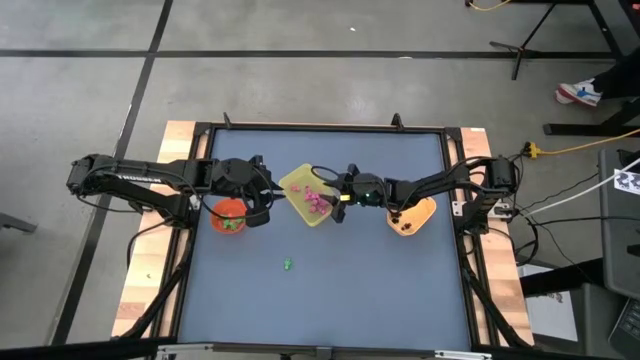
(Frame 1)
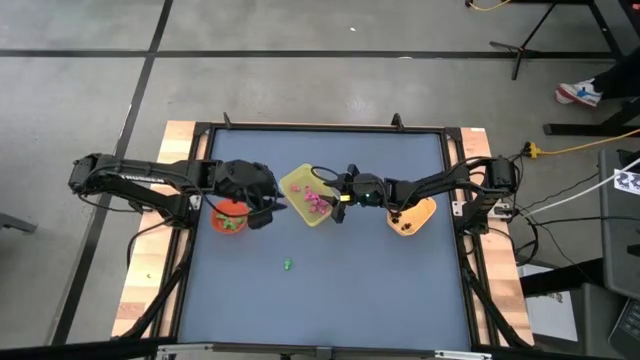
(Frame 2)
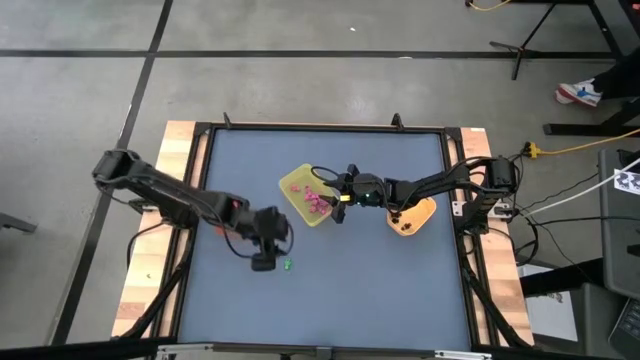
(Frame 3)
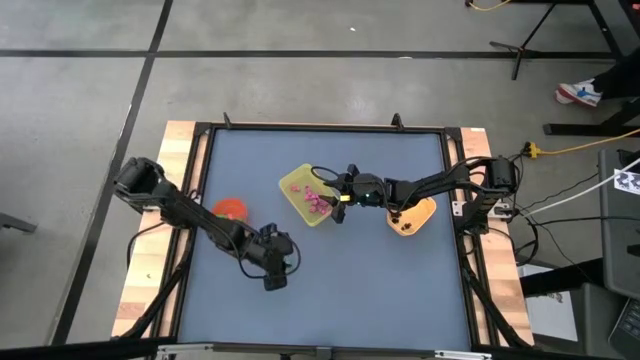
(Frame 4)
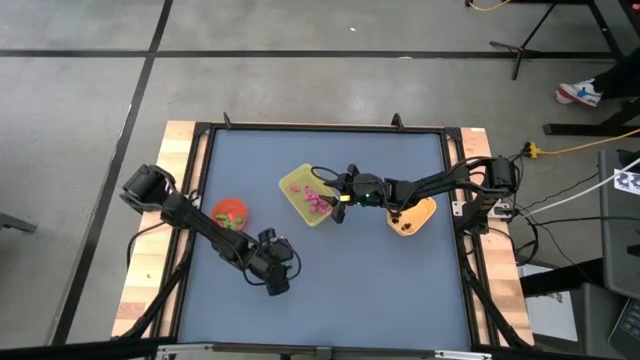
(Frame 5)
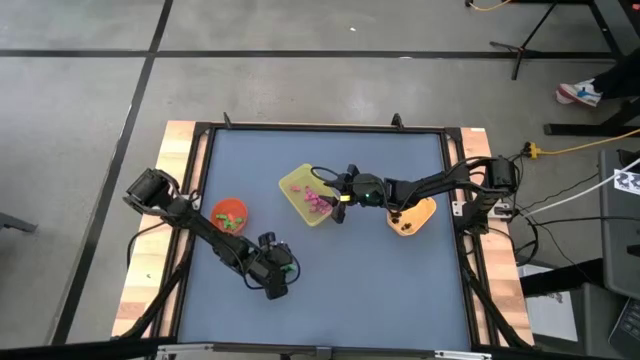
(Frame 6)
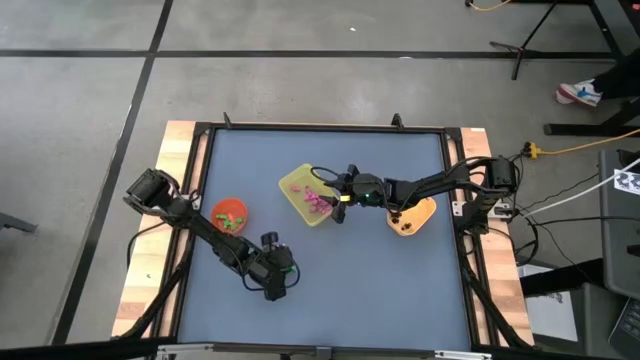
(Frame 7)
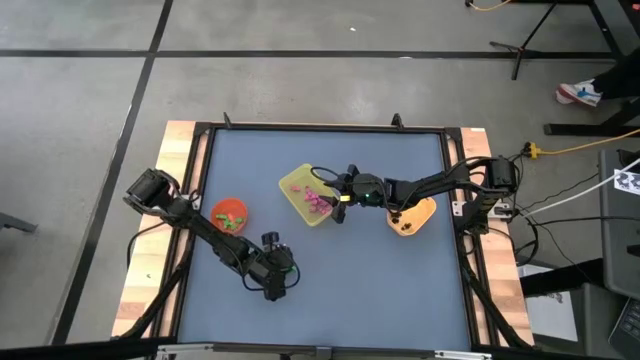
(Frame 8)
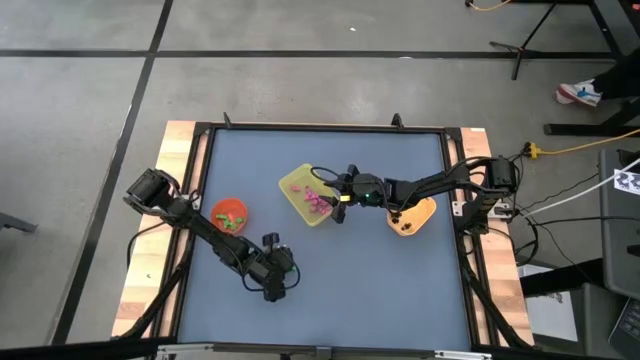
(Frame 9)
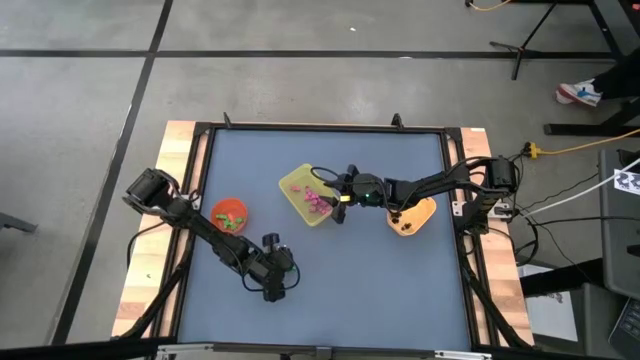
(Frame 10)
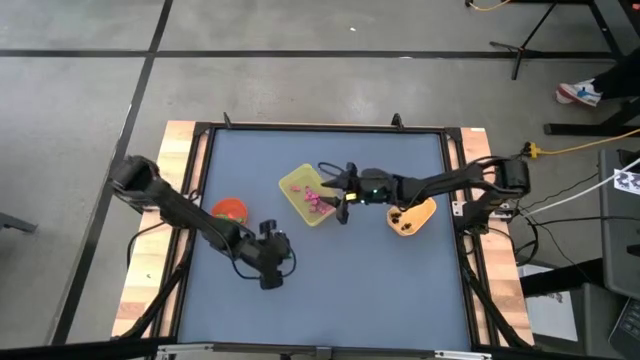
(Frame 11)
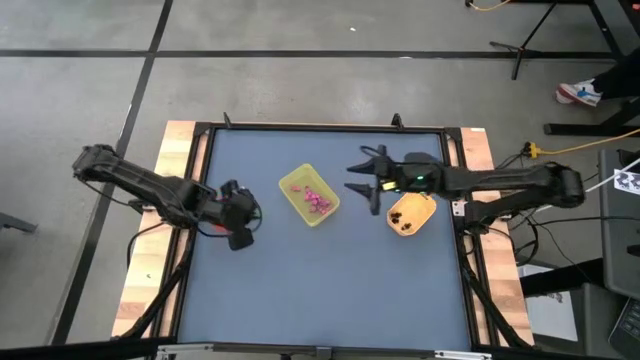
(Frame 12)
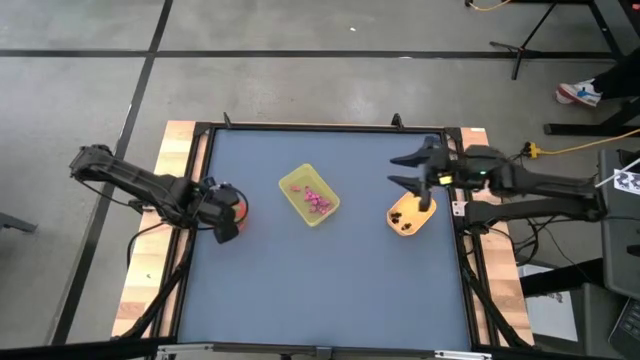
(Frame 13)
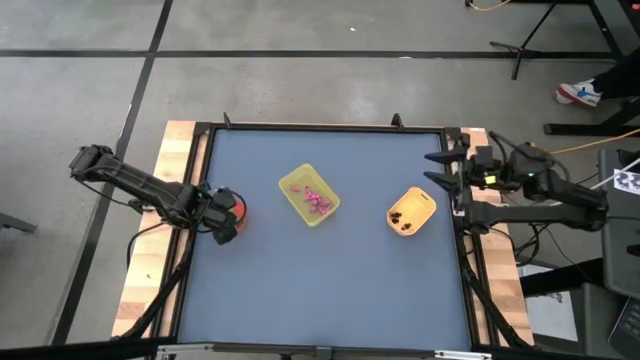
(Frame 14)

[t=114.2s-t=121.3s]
Task: Sort Halloween decoration
Put the green skeleton toy into the orange bin

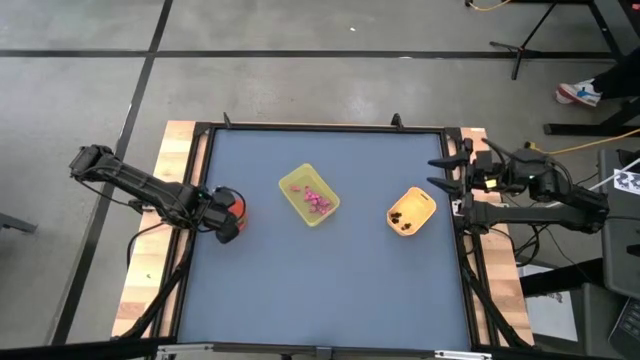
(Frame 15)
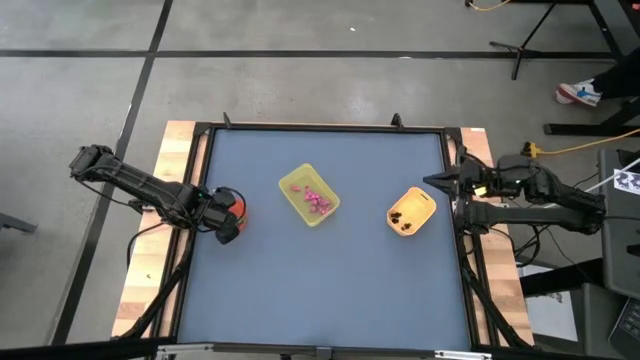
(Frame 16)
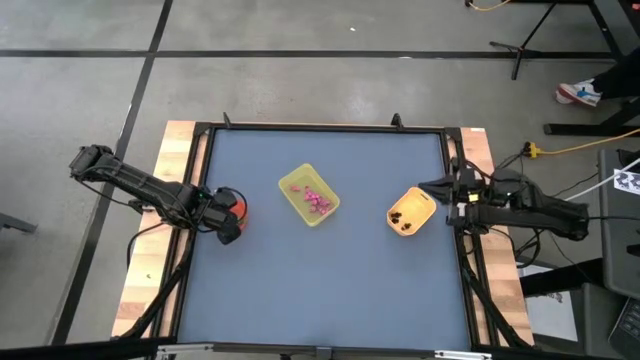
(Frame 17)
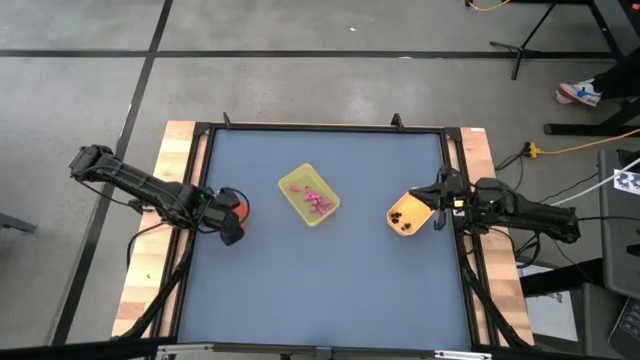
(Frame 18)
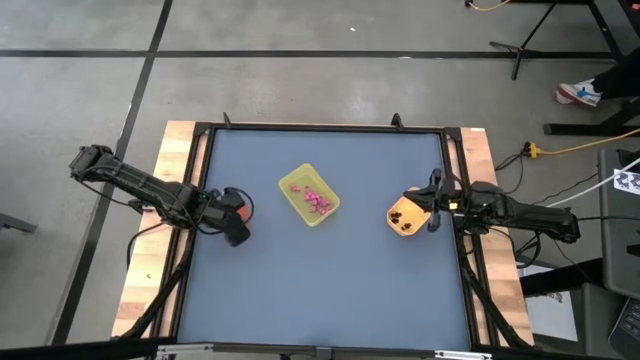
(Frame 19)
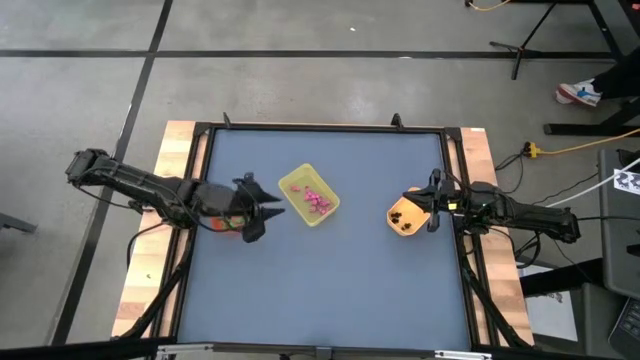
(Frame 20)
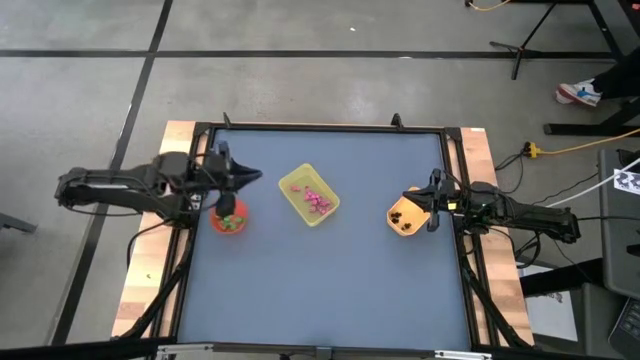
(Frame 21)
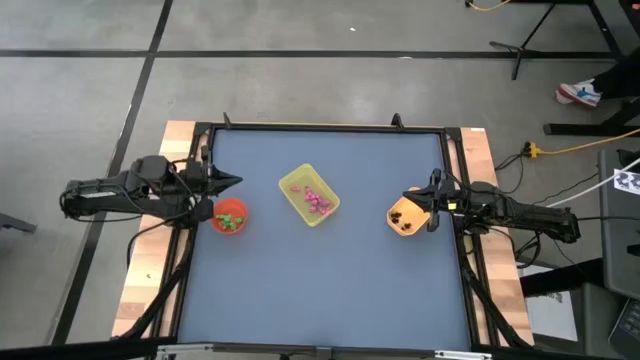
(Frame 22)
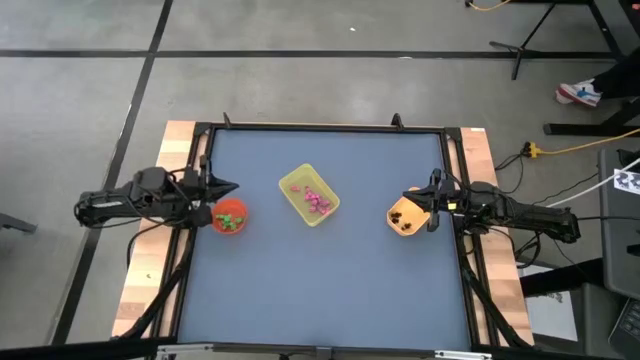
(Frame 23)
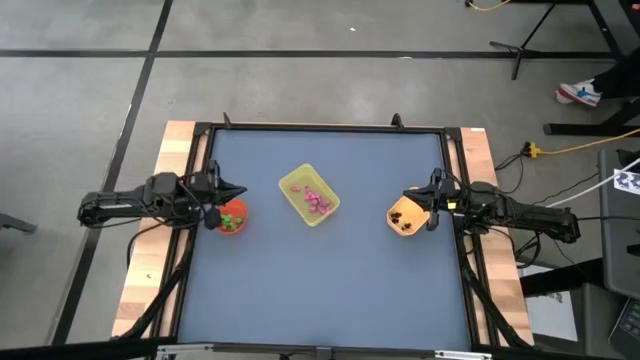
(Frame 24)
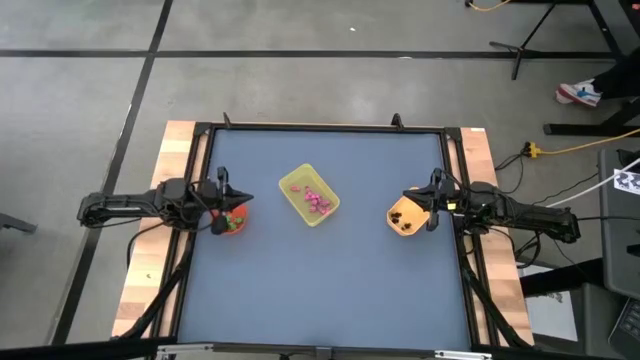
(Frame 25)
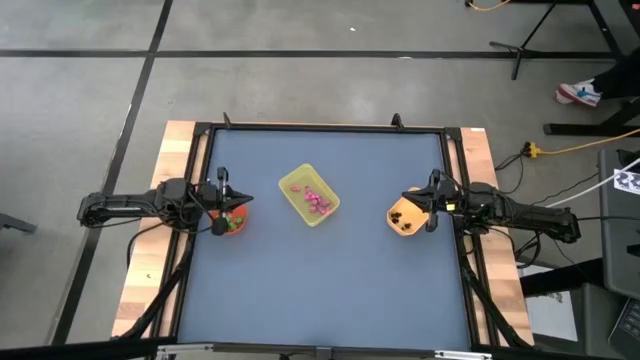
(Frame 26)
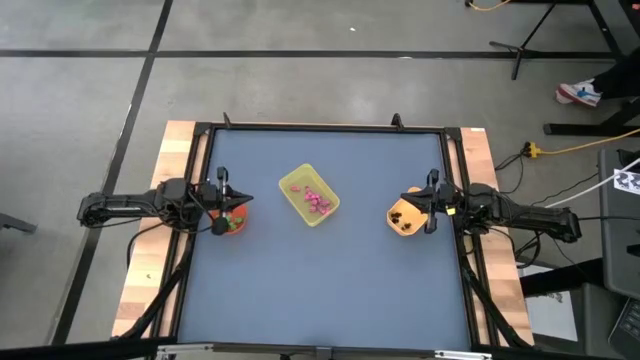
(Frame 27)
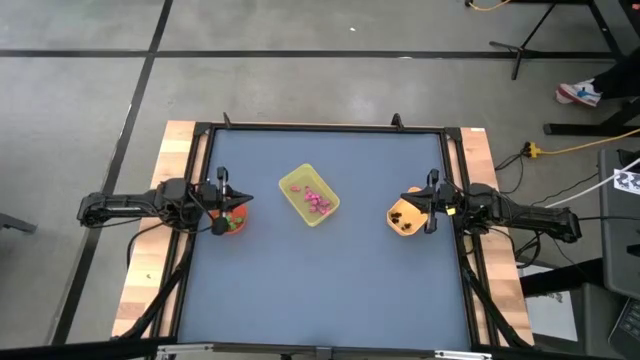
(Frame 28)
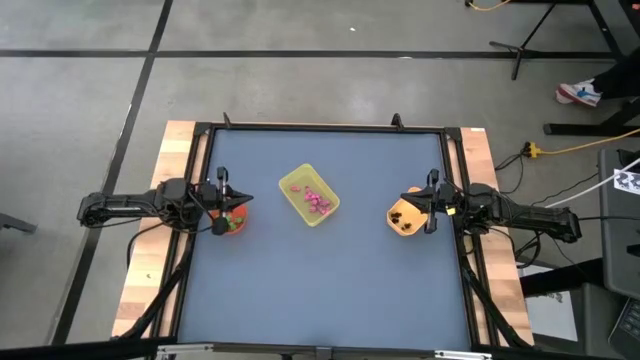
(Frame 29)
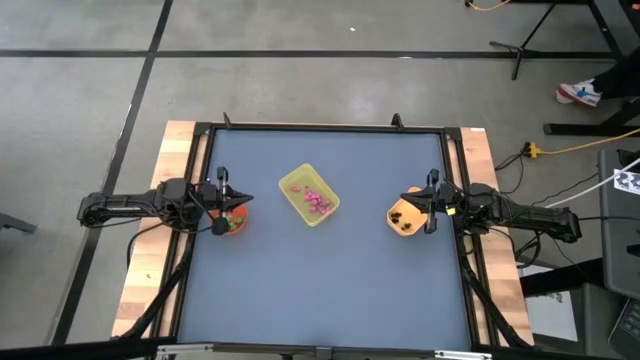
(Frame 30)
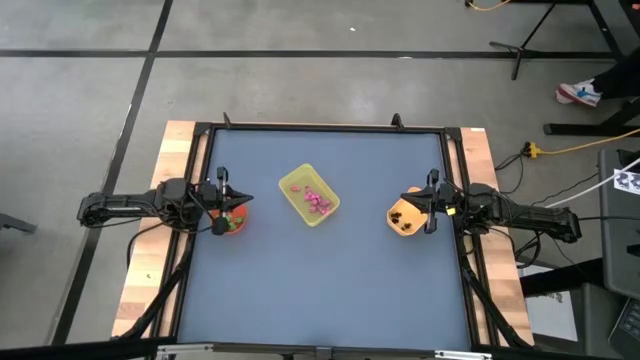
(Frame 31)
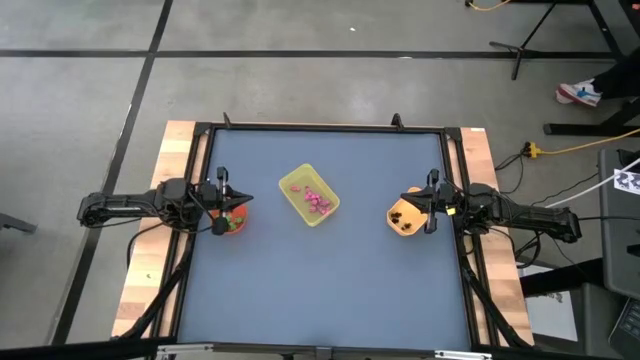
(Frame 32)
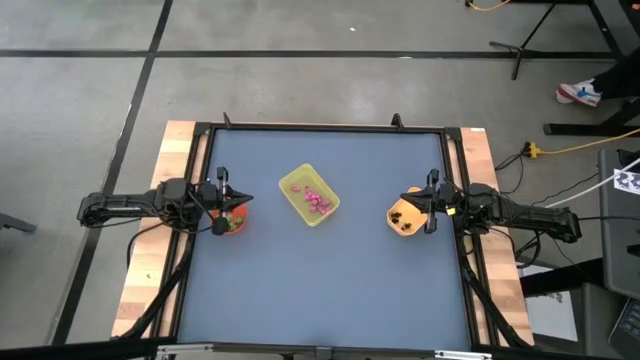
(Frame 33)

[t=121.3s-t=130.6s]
Return to Home Position

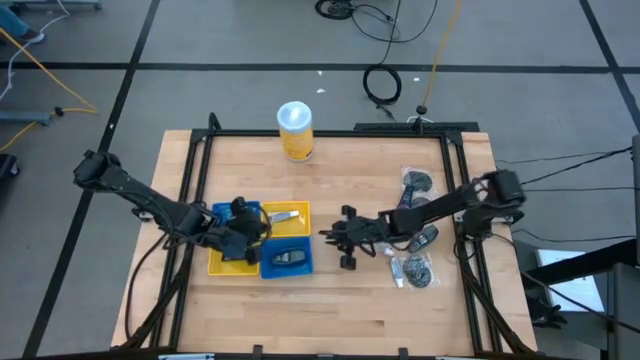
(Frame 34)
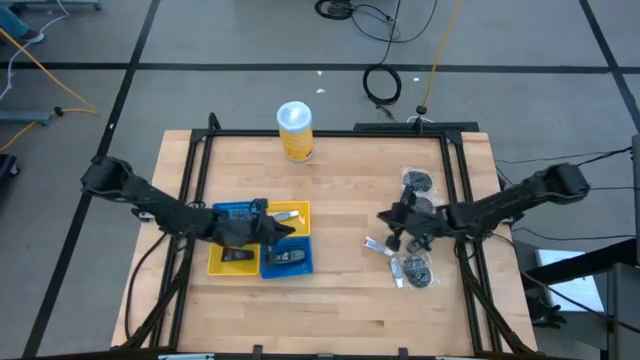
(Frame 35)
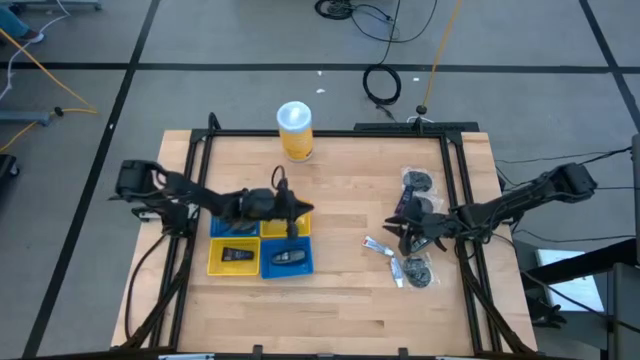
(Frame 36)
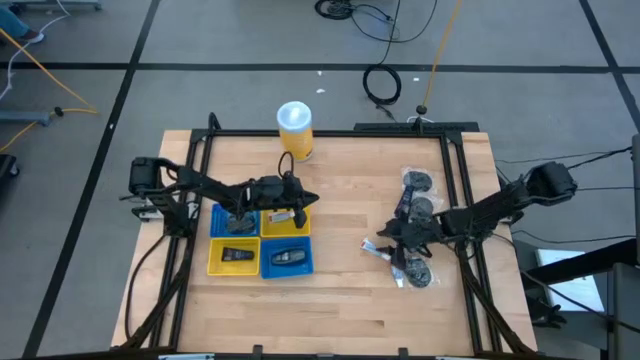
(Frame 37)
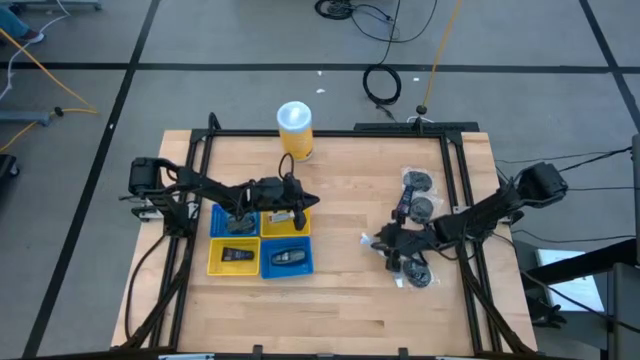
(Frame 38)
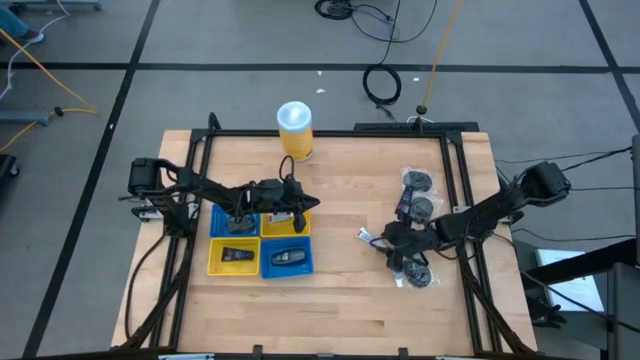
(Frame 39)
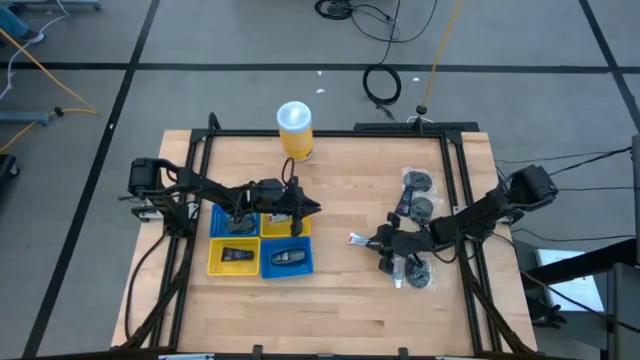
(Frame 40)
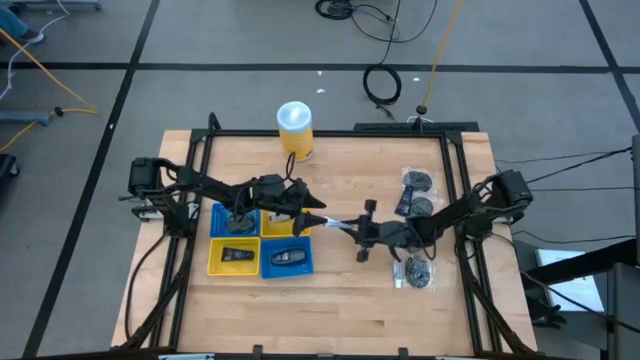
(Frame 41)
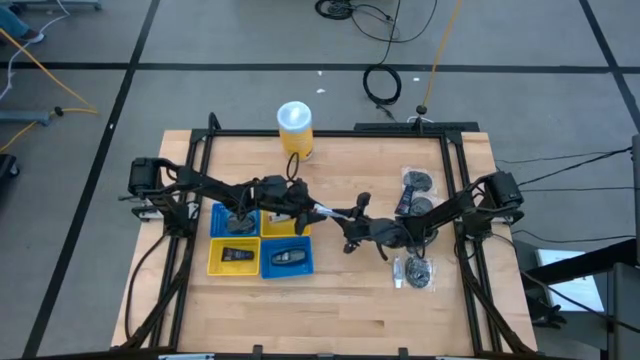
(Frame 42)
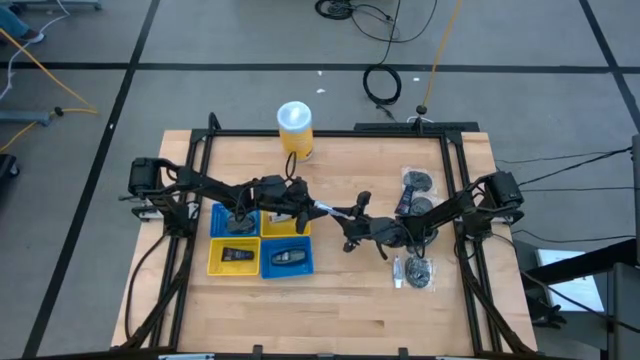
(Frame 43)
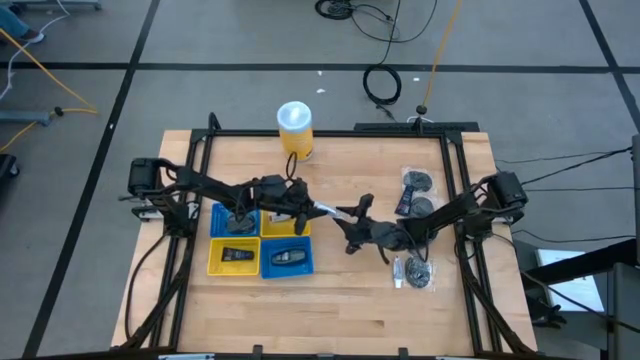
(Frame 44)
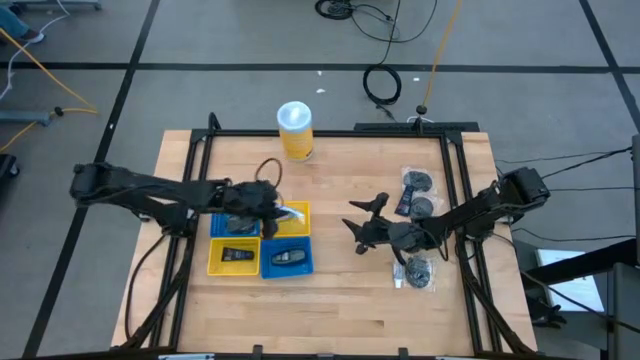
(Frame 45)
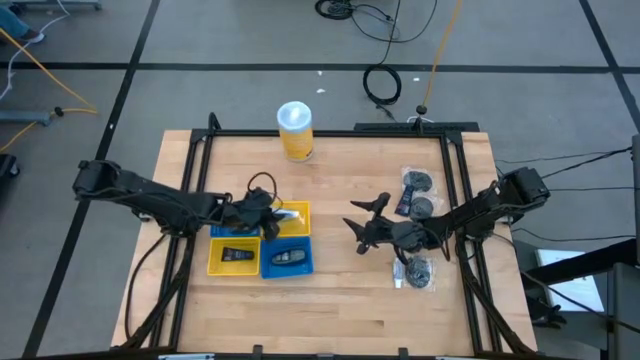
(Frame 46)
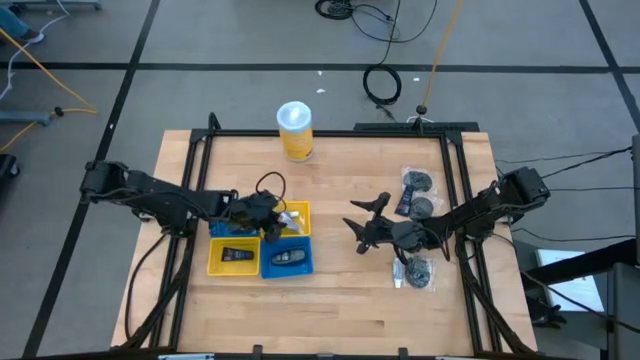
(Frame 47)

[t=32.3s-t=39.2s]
Task: Pick & Place Travel size toiletries
Put the white toothpaste into the top yellow bin
